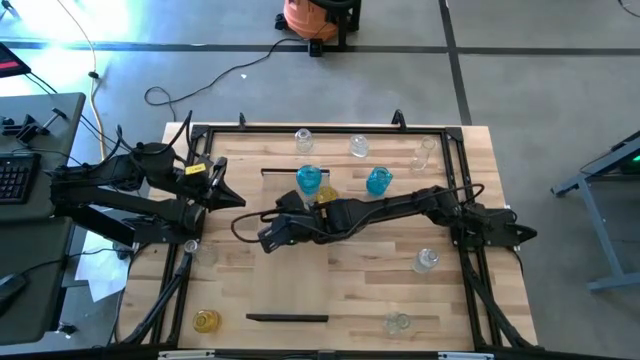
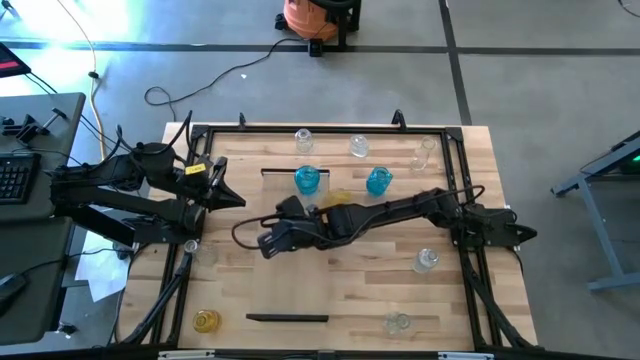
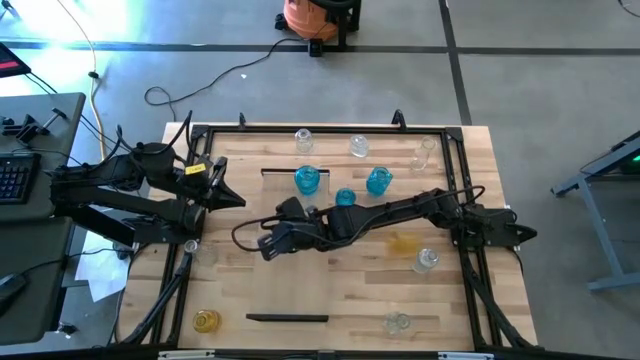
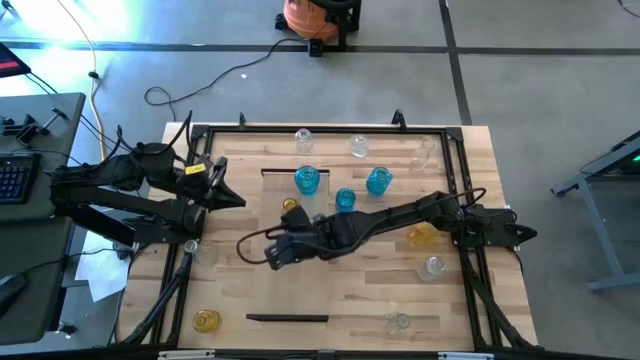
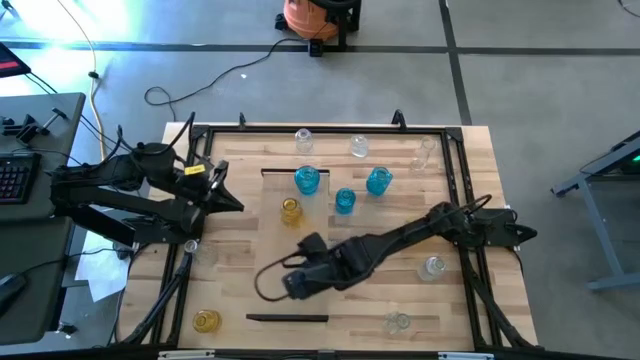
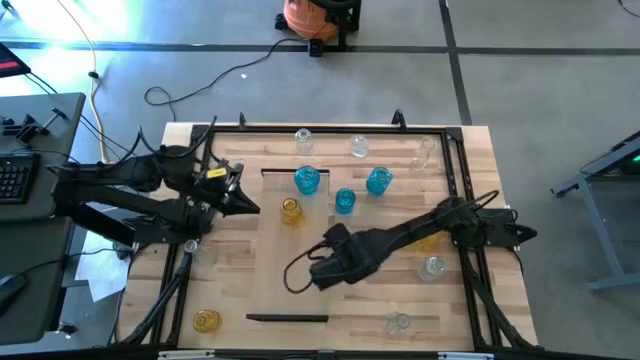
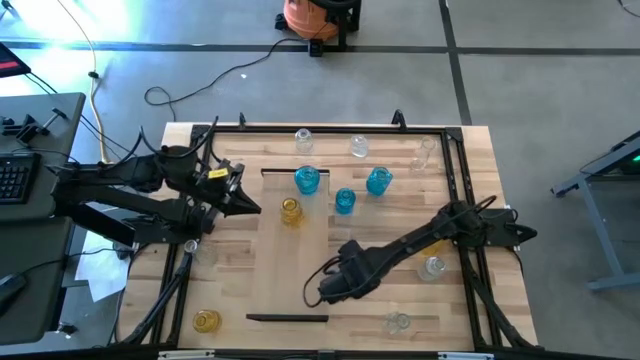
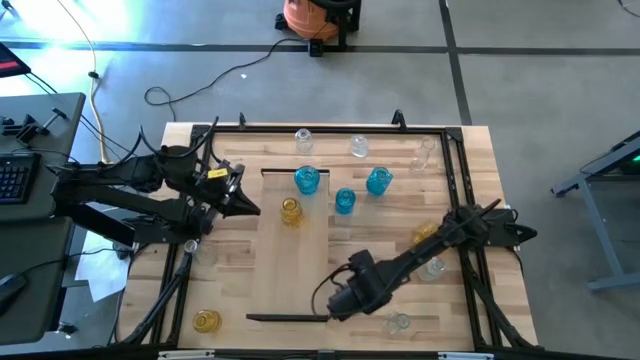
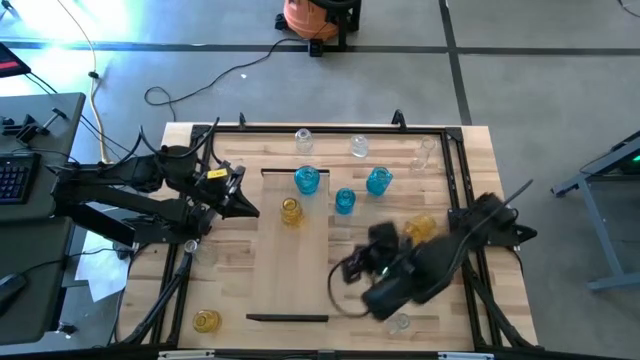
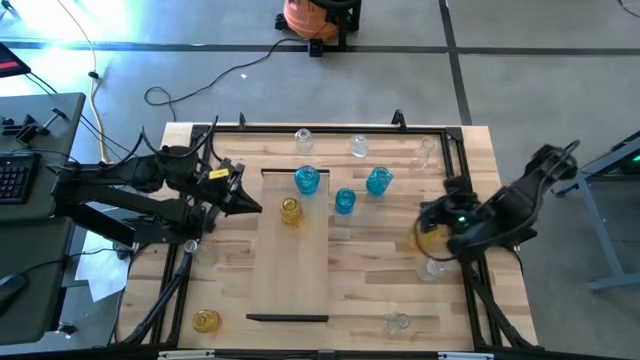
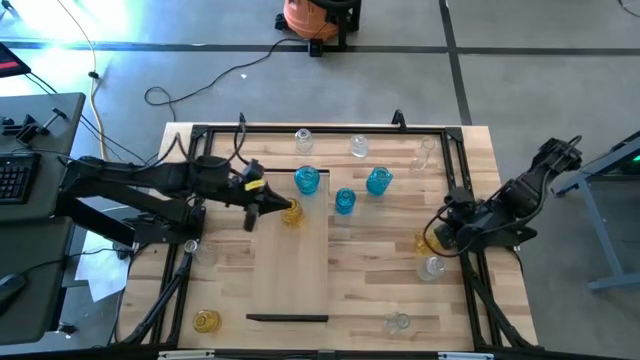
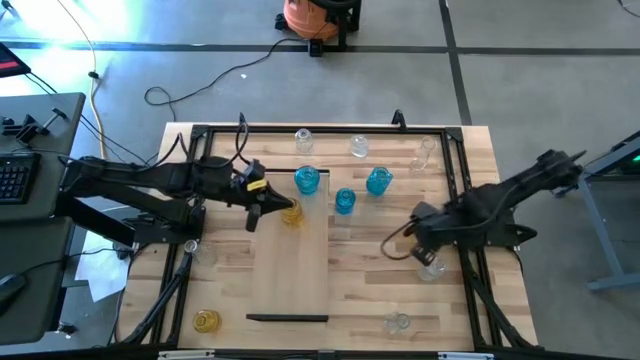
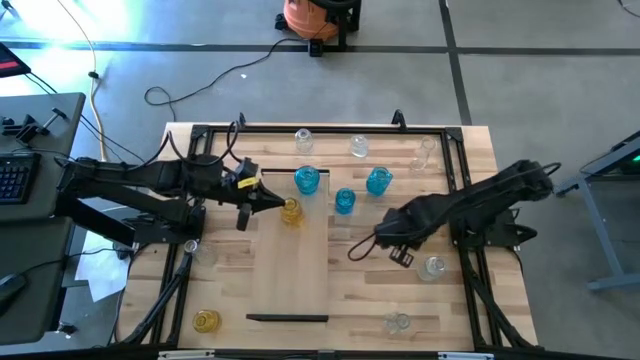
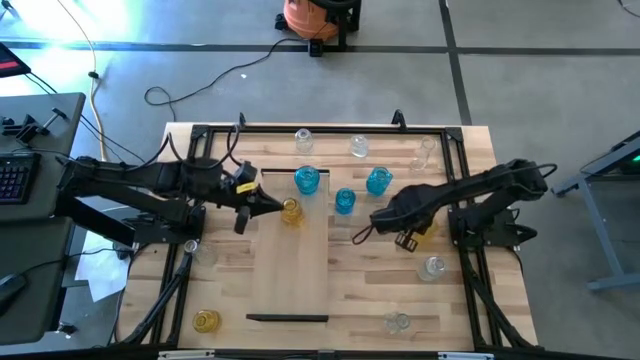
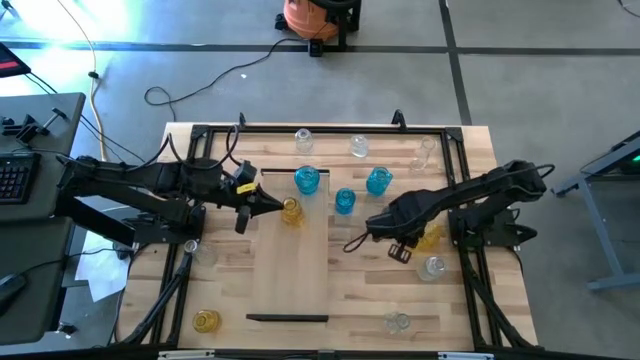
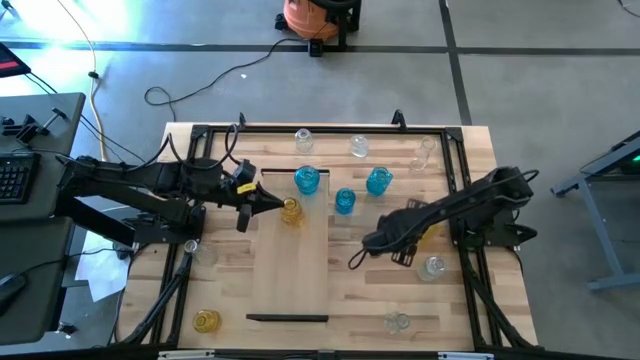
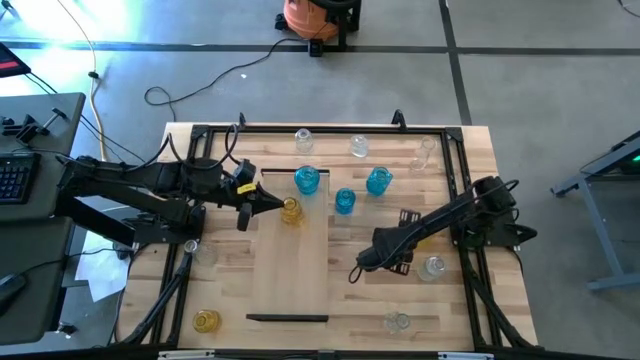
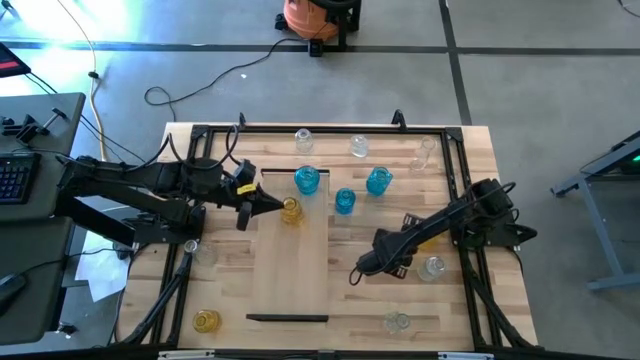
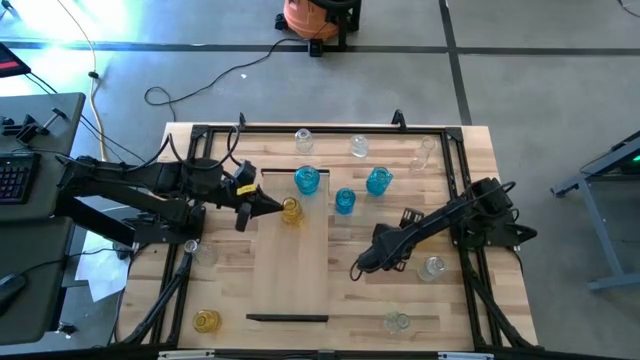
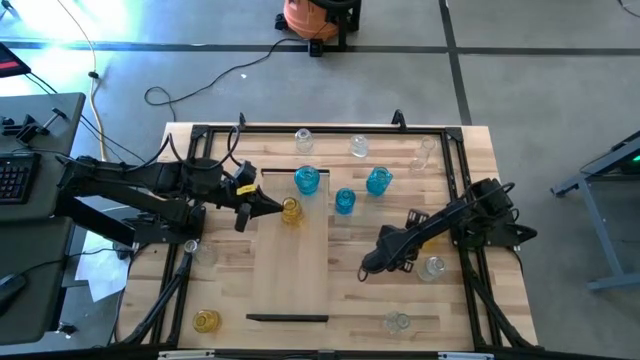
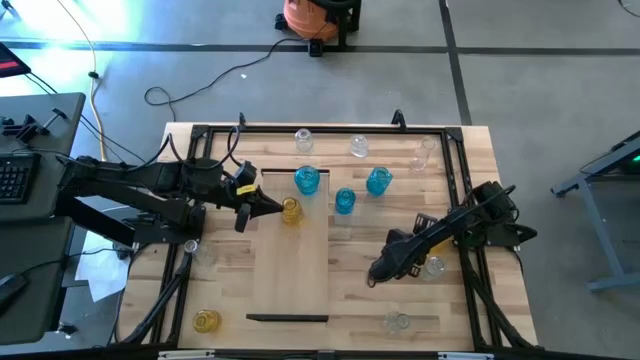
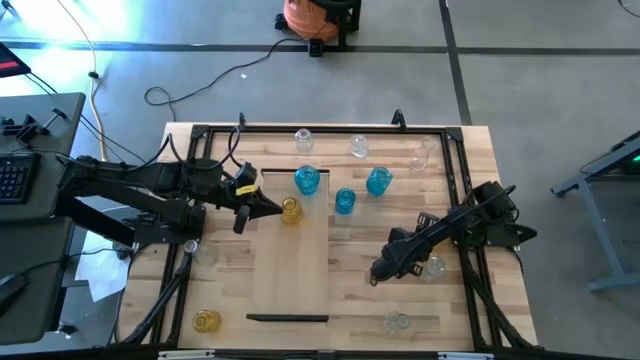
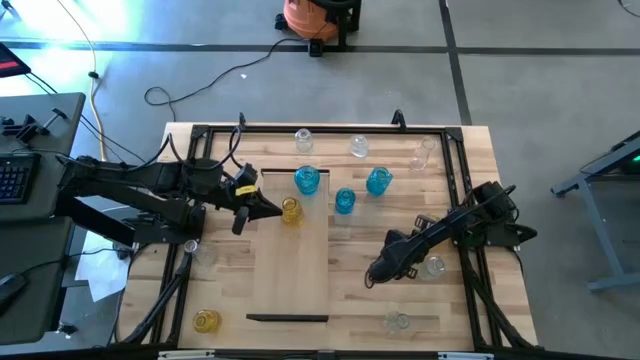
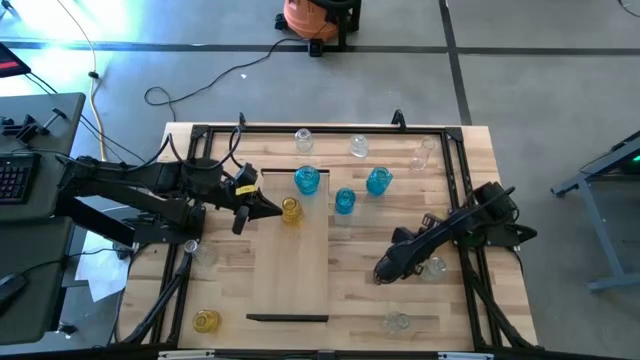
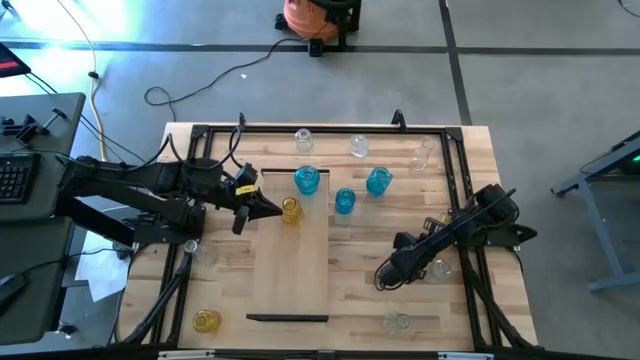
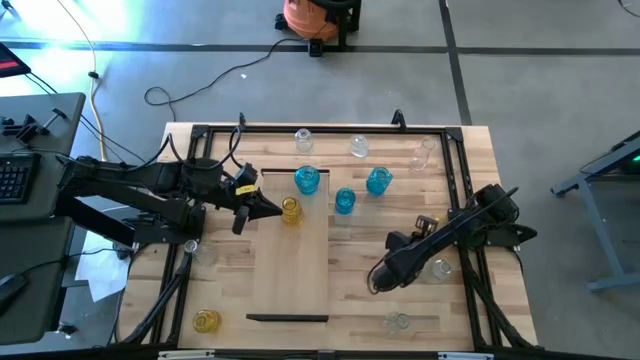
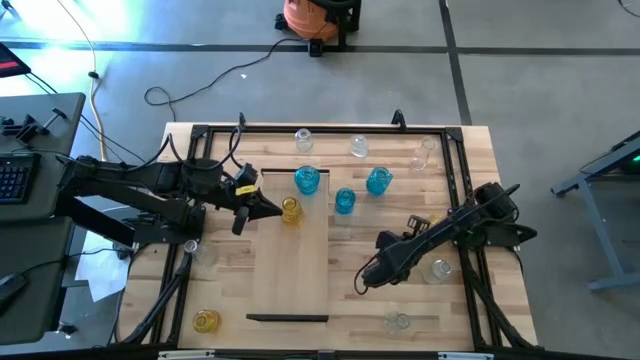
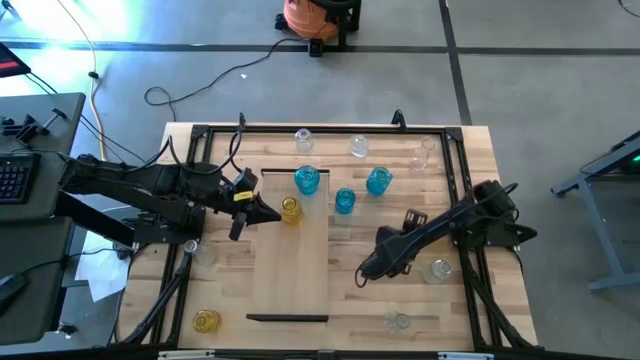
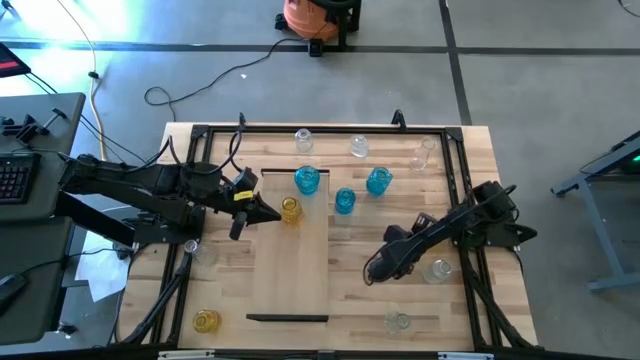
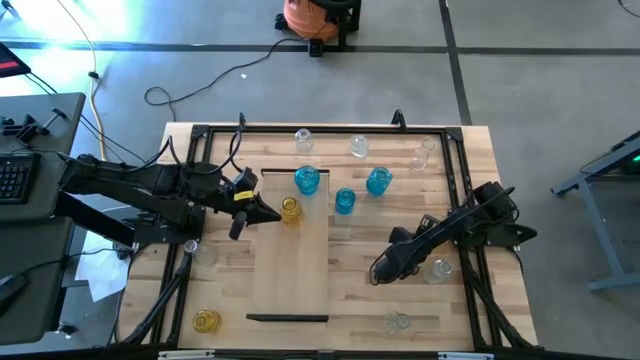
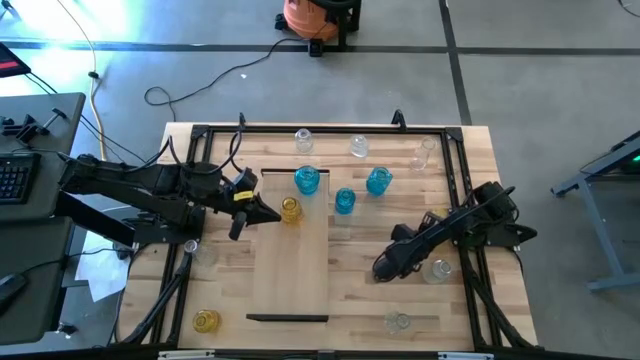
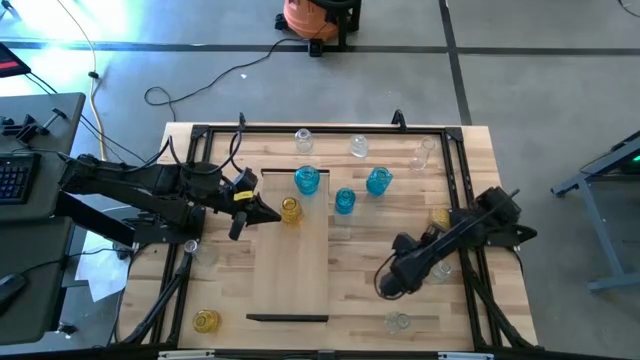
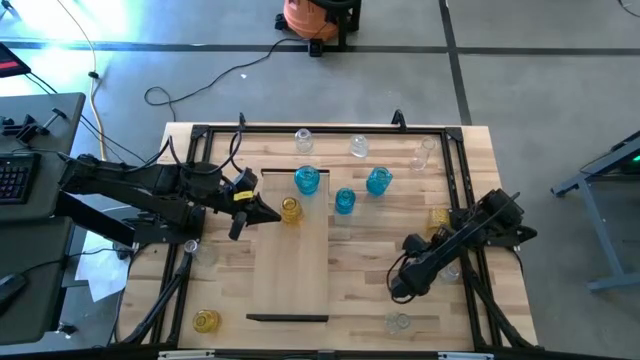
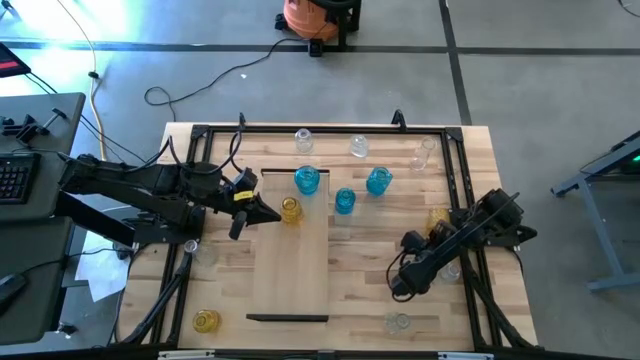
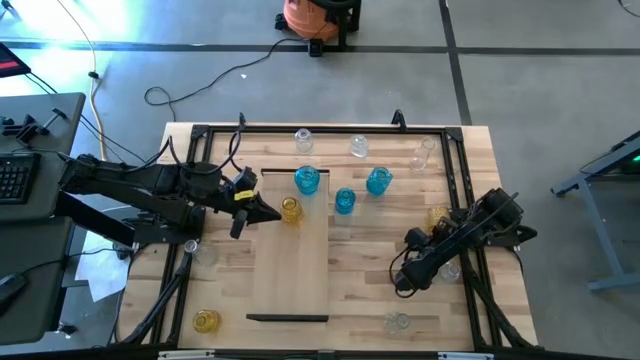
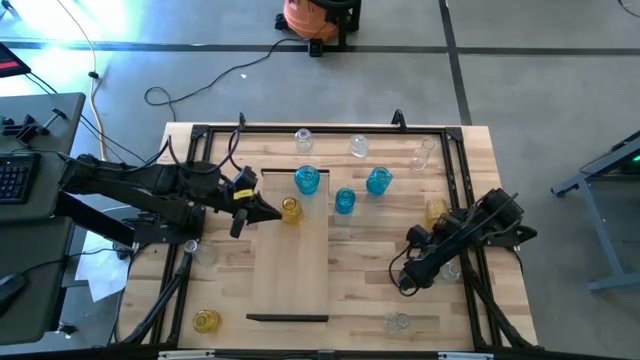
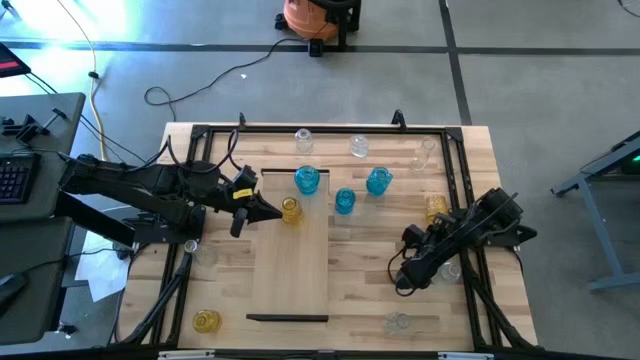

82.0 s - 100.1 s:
Task: sort vases onto shelf
Put the yellow vase on the shelf to align with the other yellow vase

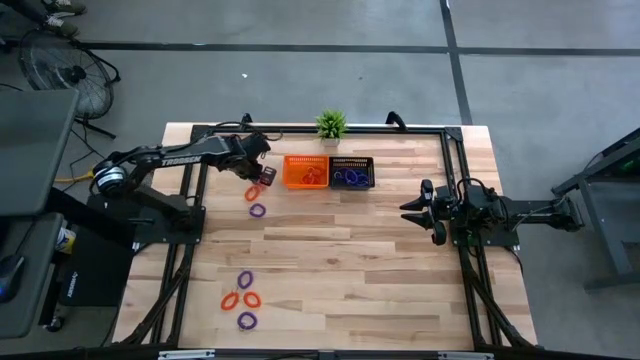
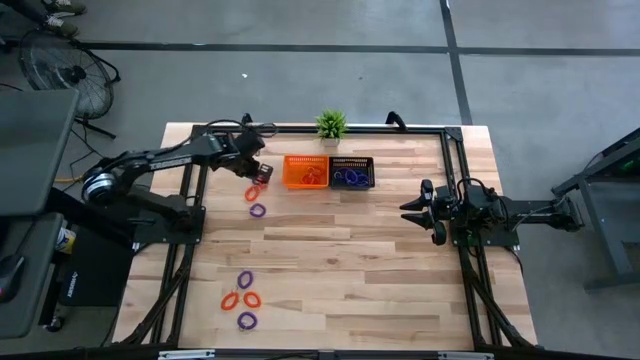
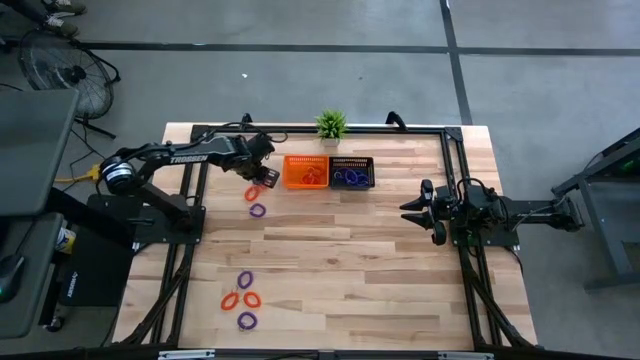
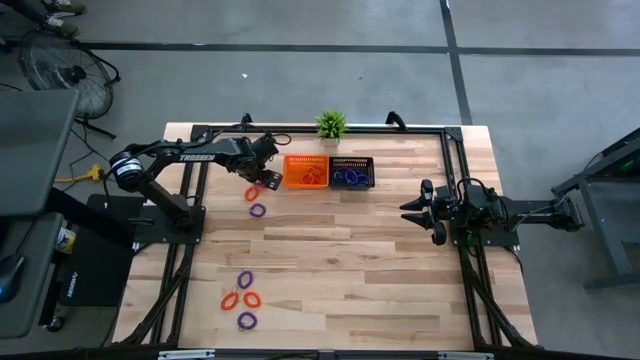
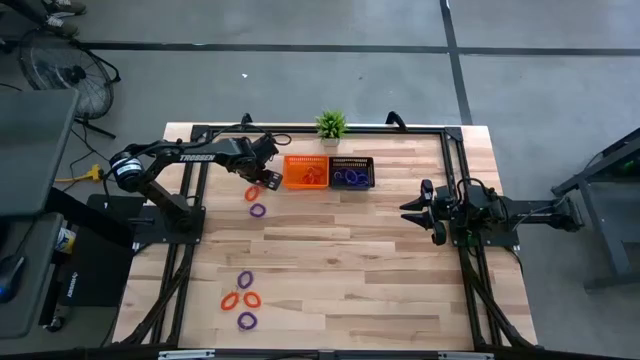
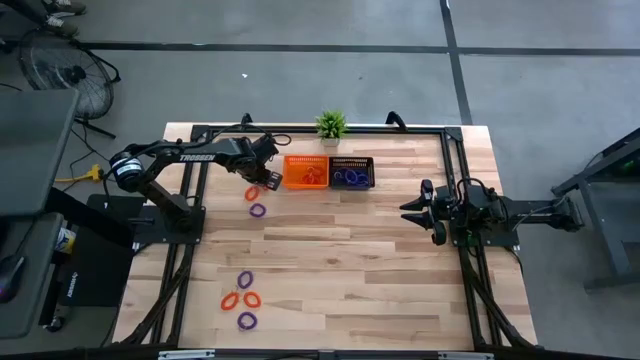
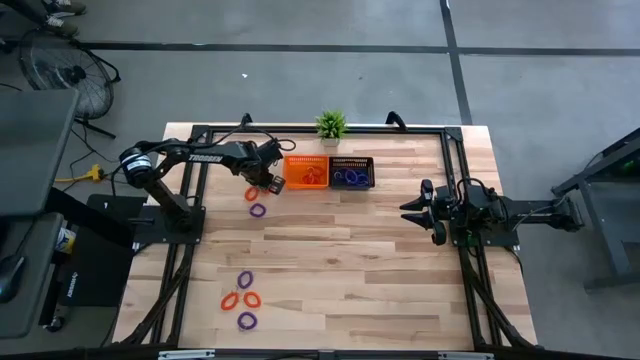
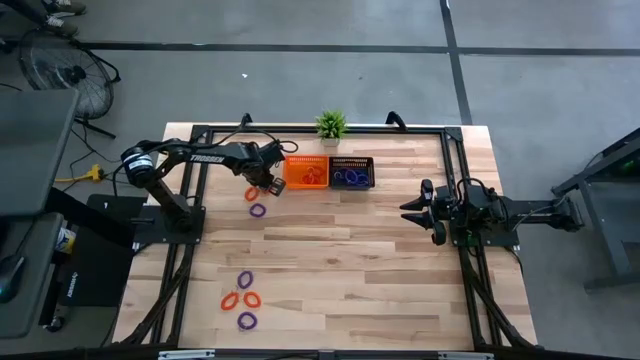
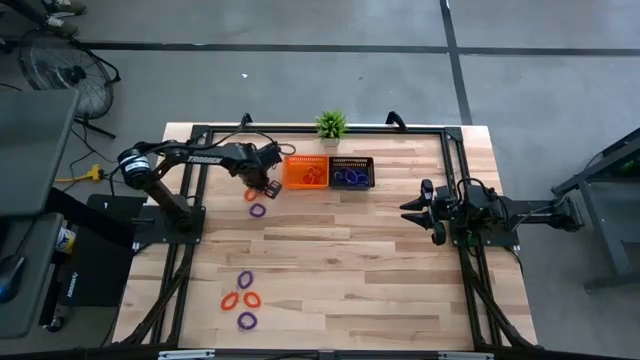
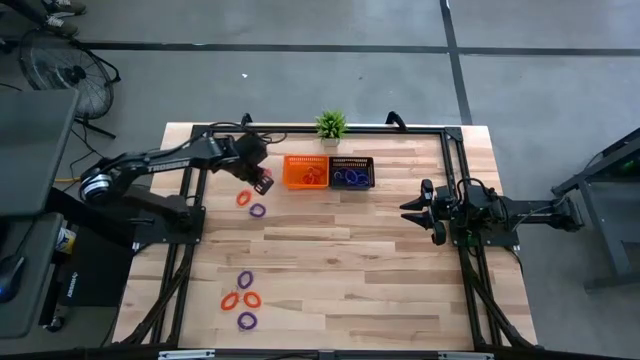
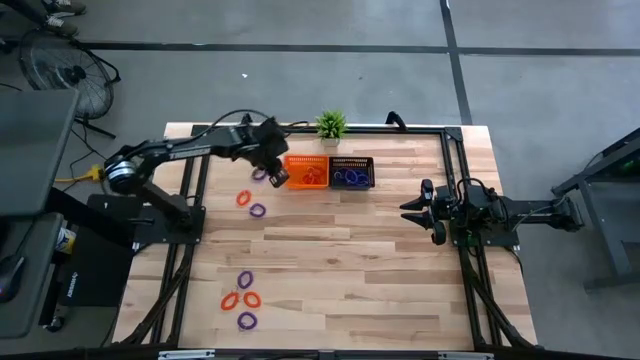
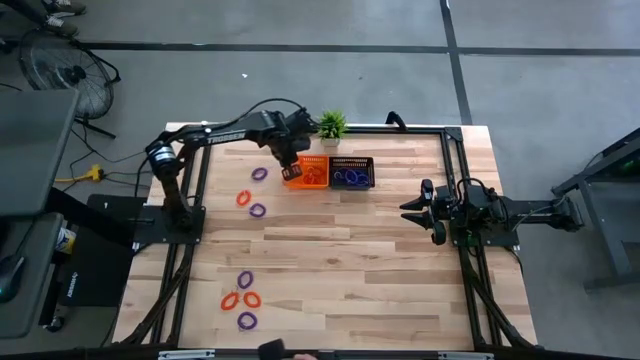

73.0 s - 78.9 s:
Task: Sort spring keychains into baskets
Put the orange spring keychain into the orange basket
